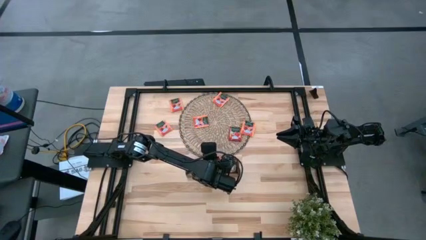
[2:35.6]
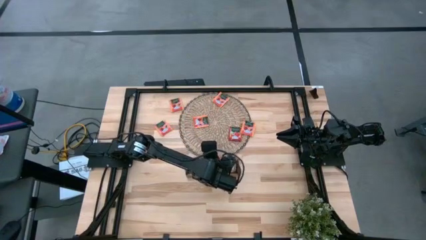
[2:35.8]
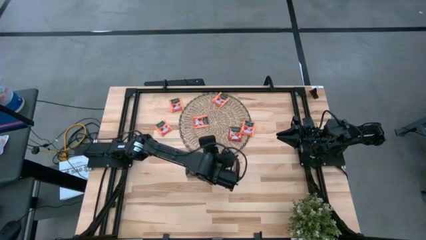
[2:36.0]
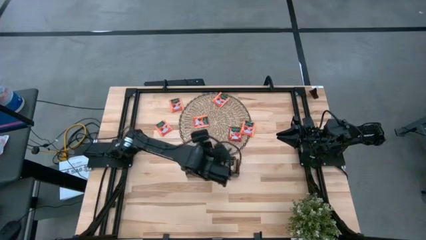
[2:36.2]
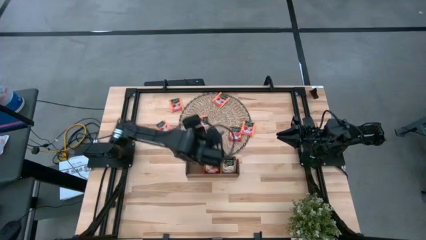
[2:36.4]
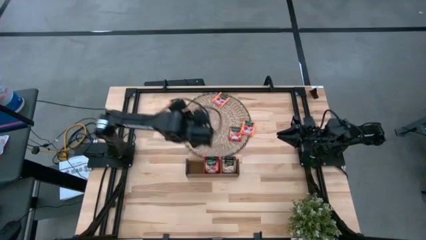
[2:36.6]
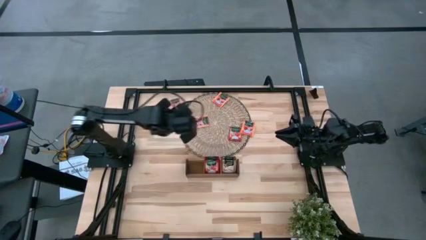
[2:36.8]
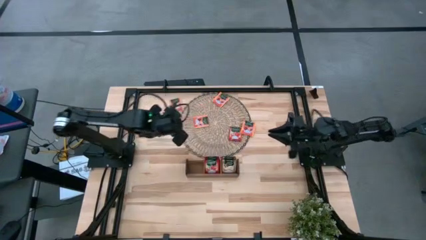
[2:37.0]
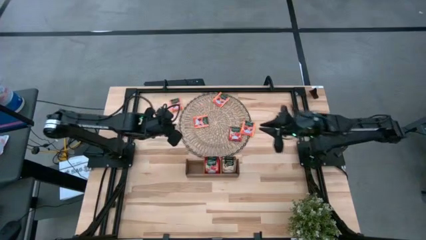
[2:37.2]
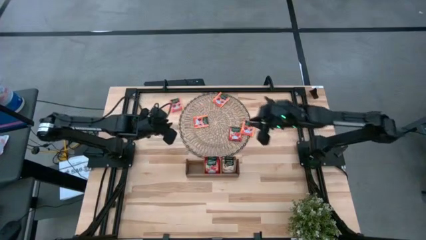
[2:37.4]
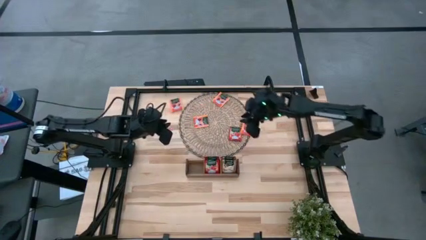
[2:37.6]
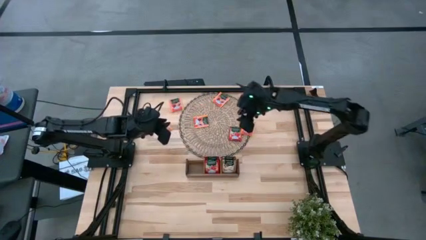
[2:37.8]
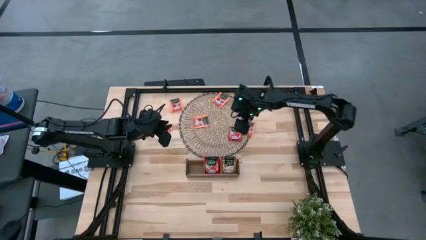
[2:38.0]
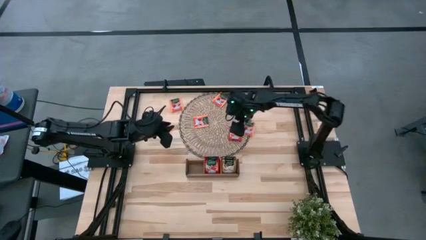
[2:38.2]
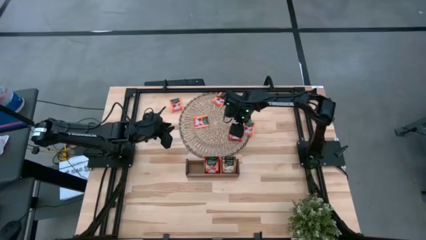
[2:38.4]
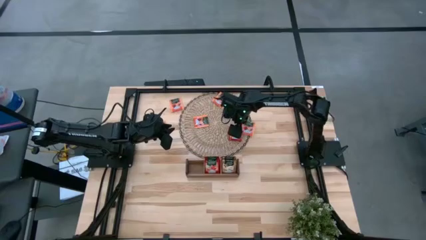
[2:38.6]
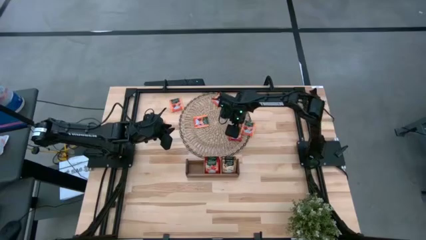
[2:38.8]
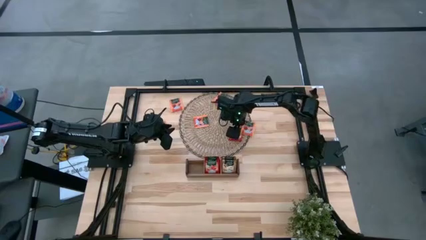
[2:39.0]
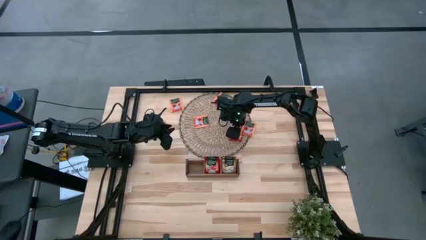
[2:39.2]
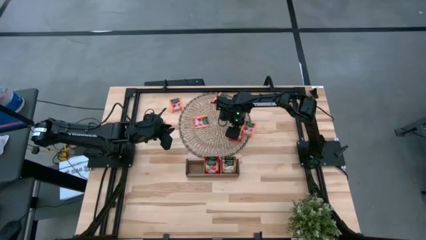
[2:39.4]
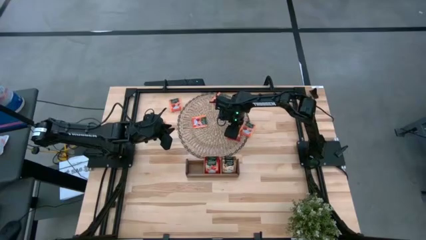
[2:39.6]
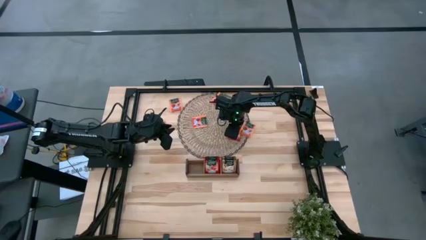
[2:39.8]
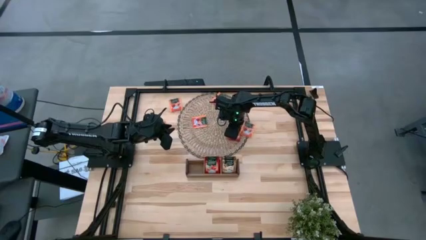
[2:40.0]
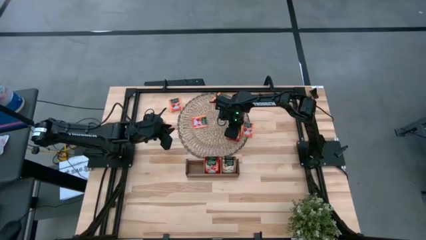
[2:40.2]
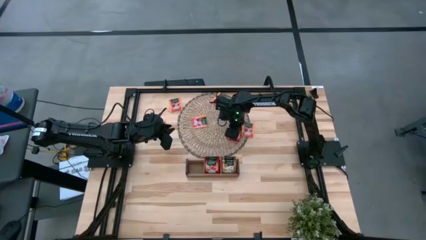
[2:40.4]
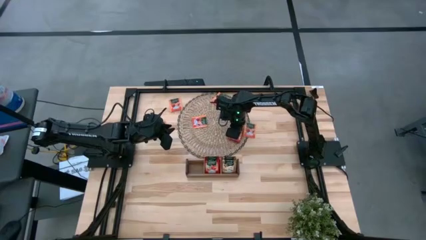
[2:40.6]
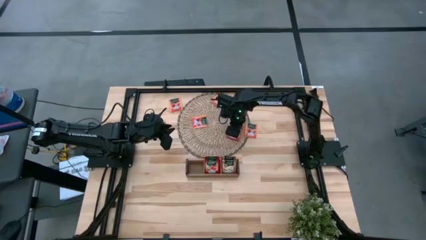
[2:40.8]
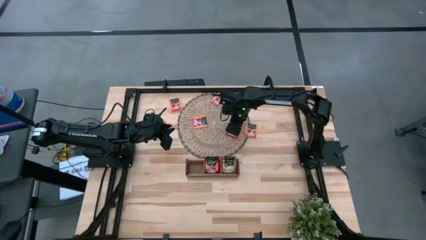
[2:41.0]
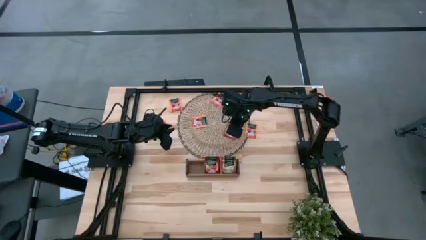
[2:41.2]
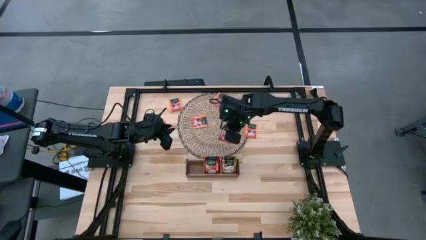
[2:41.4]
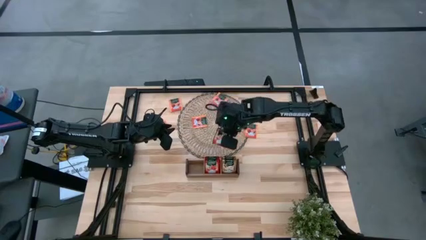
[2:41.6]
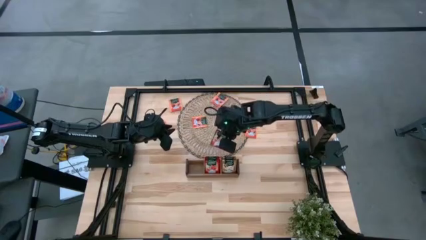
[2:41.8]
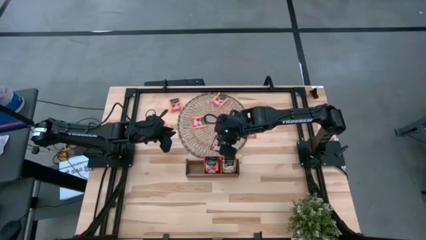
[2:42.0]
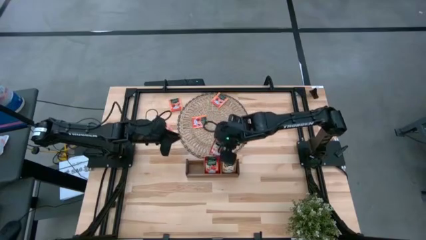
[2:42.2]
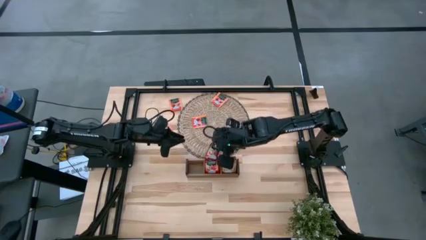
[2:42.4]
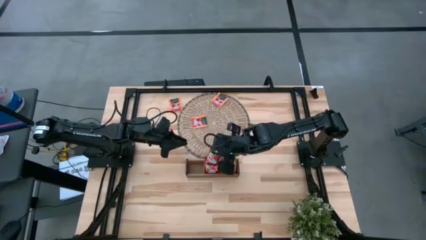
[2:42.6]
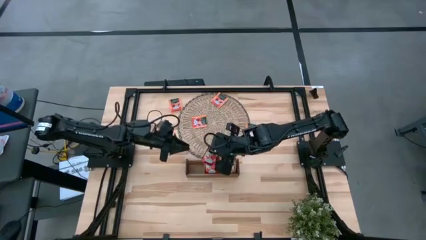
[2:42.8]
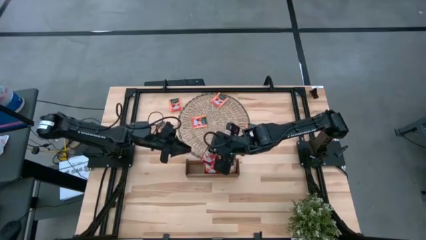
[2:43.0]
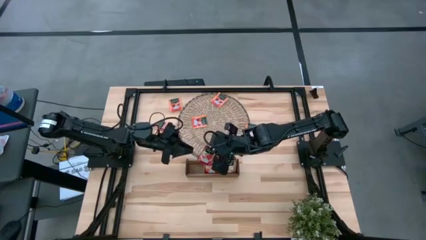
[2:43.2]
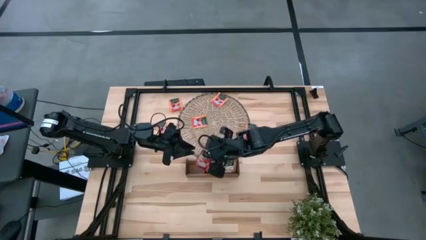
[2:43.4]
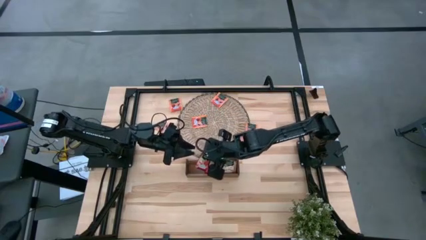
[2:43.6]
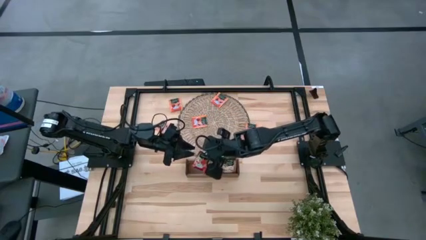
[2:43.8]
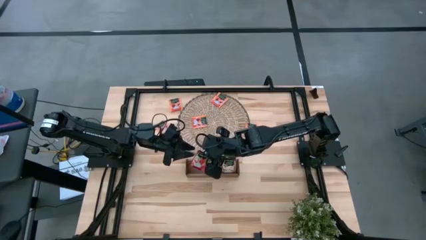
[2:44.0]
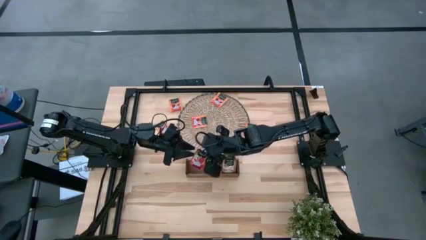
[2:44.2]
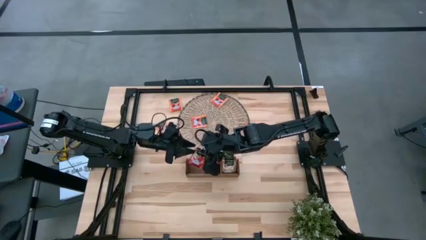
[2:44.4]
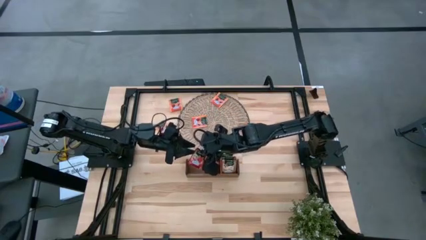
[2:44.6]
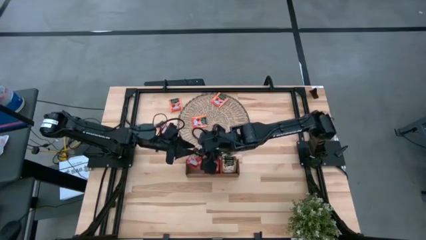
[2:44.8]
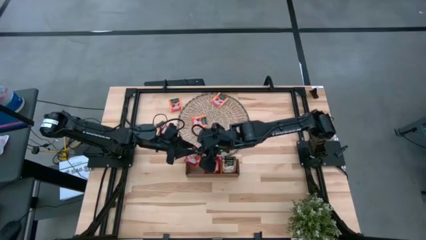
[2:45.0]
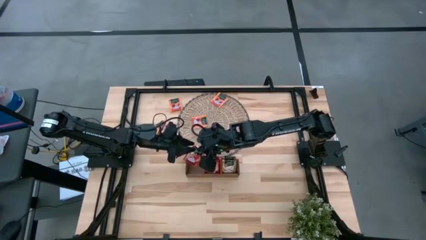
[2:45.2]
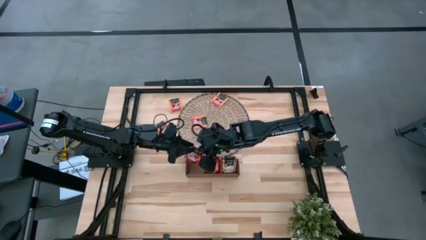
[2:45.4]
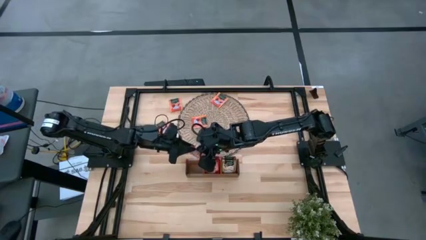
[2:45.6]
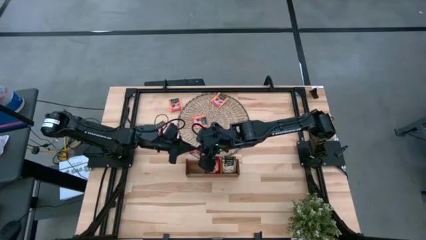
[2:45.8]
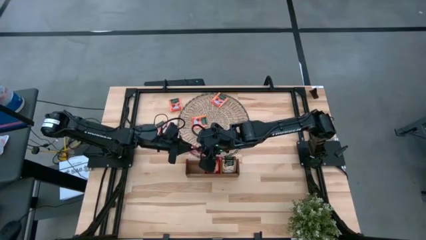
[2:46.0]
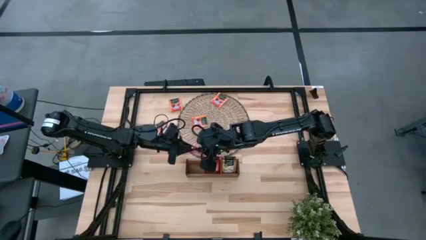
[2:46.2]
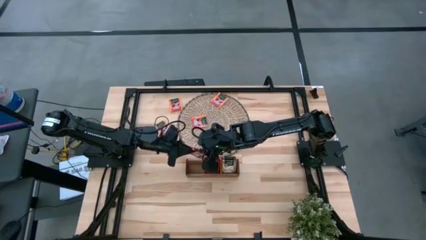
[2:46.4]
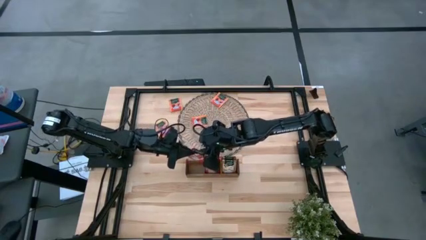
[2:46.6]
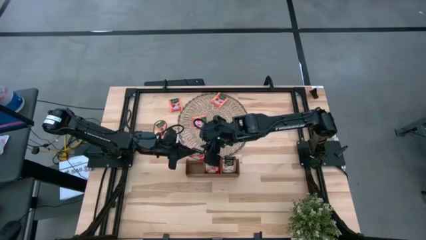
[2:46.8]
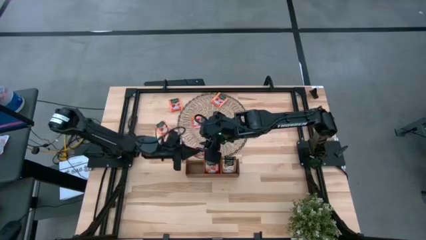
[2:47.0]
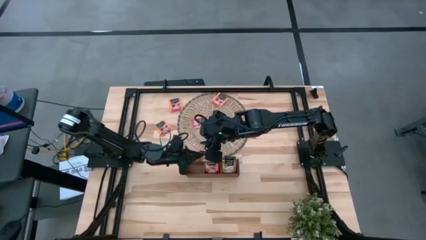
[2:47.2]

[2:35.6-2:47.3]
Task: Pick & Place Tea
Put the red tea bag into the middle section of the wooden organizer
